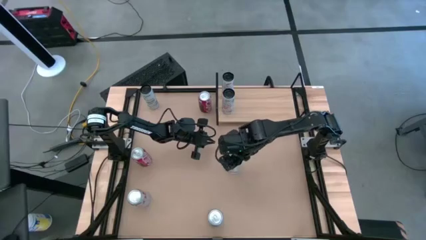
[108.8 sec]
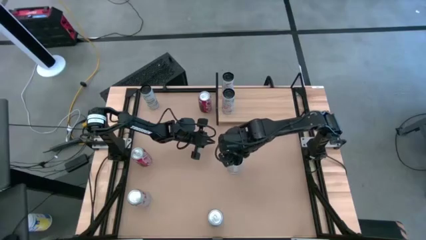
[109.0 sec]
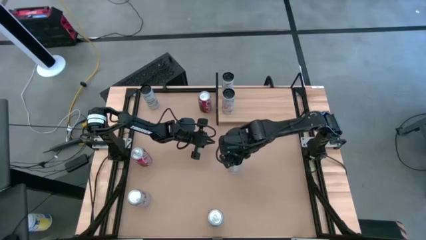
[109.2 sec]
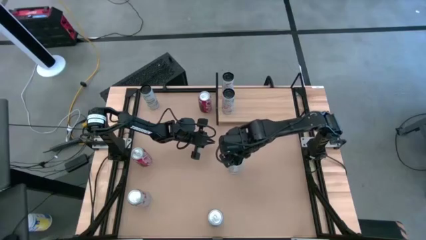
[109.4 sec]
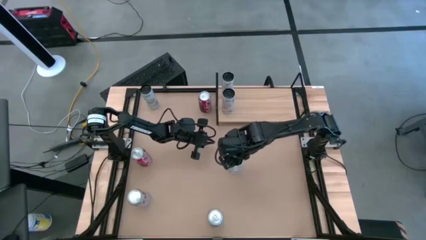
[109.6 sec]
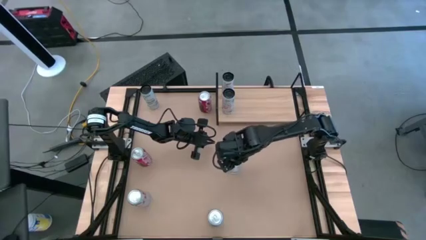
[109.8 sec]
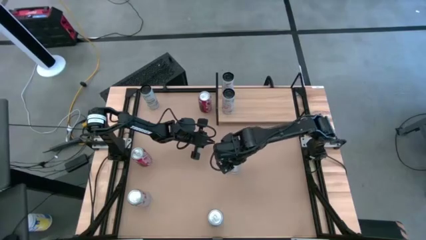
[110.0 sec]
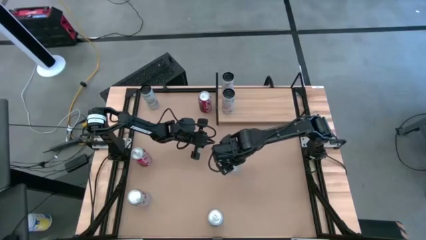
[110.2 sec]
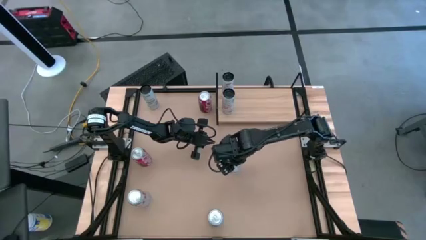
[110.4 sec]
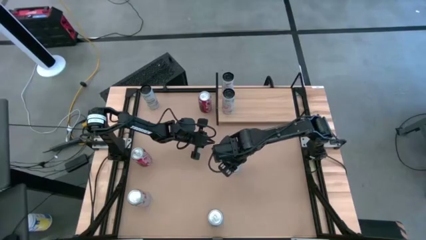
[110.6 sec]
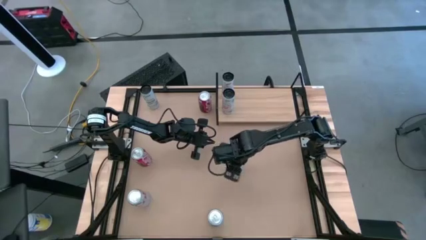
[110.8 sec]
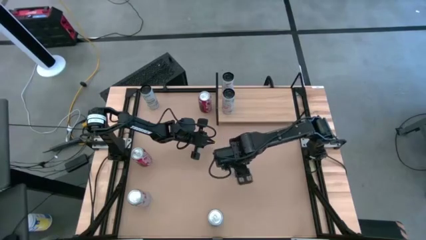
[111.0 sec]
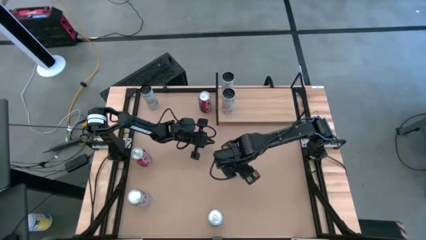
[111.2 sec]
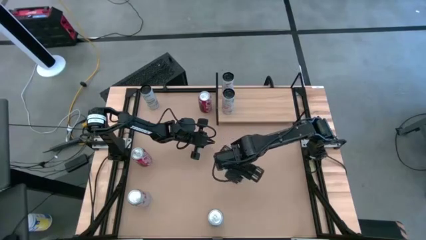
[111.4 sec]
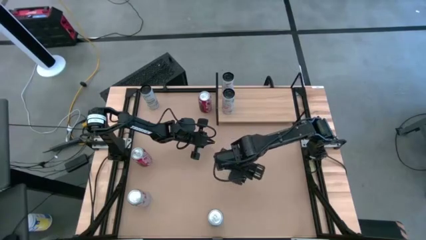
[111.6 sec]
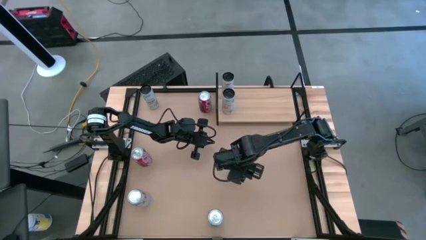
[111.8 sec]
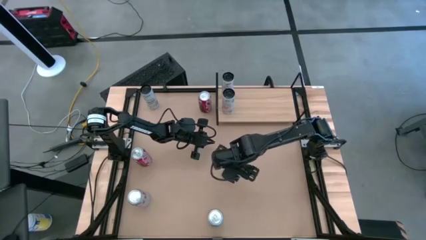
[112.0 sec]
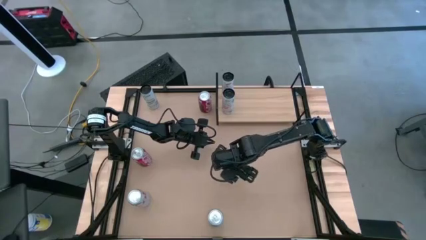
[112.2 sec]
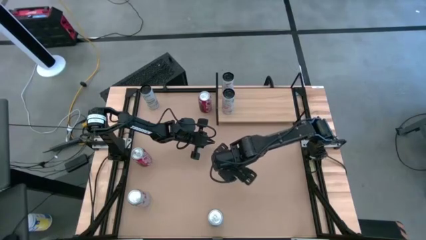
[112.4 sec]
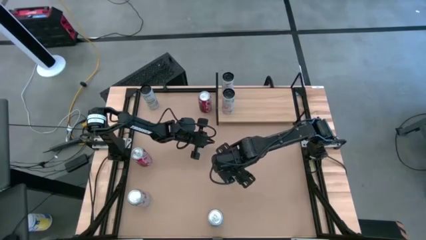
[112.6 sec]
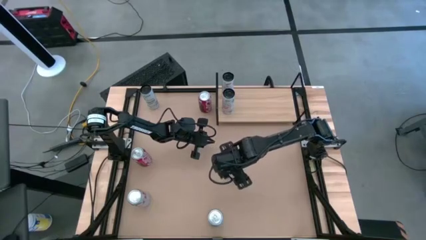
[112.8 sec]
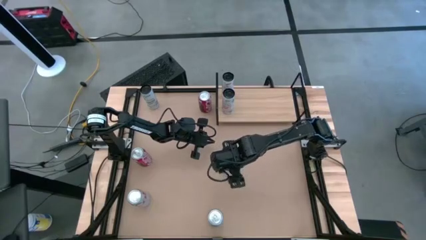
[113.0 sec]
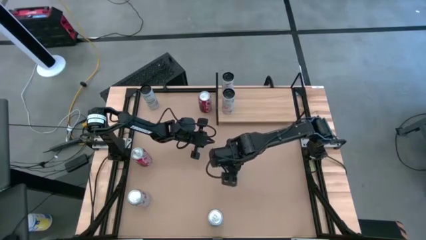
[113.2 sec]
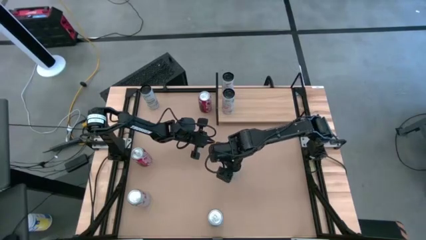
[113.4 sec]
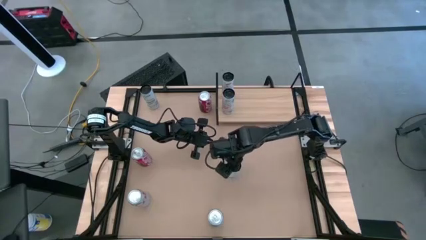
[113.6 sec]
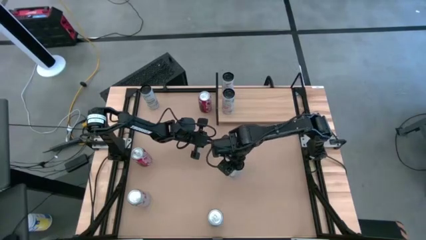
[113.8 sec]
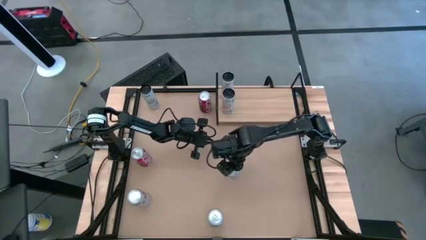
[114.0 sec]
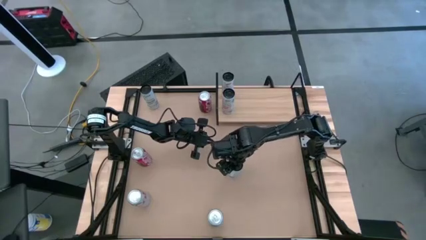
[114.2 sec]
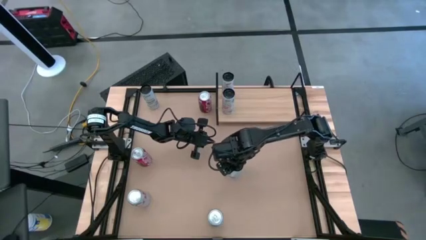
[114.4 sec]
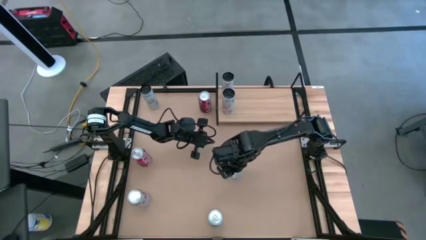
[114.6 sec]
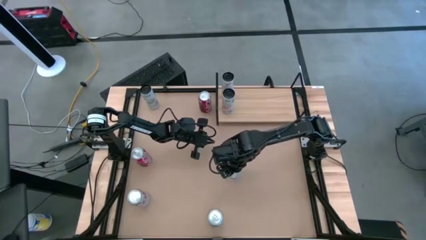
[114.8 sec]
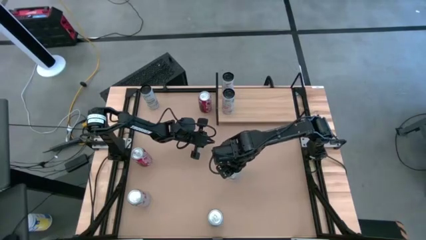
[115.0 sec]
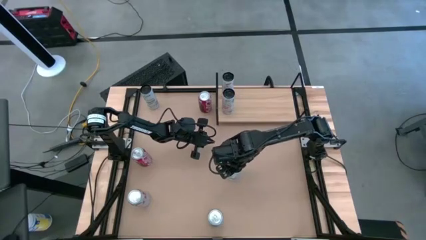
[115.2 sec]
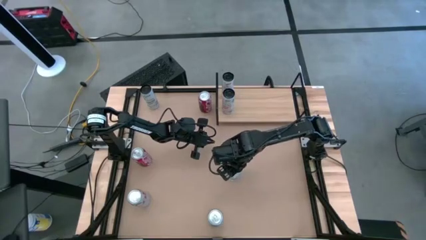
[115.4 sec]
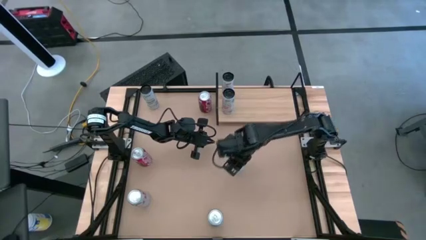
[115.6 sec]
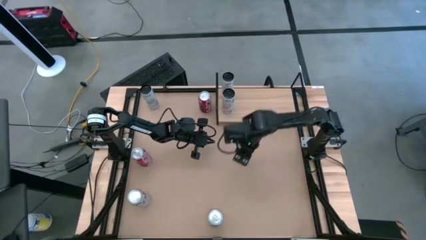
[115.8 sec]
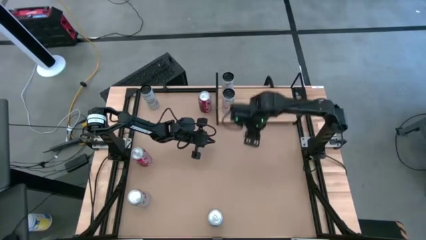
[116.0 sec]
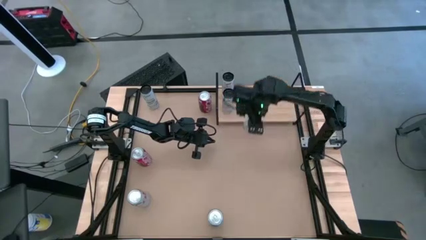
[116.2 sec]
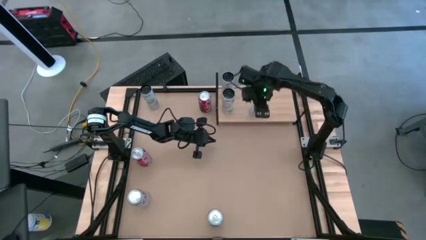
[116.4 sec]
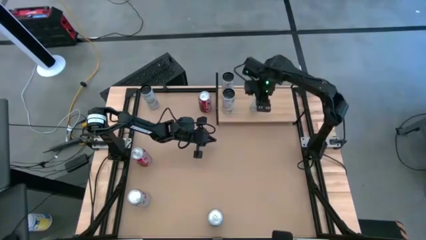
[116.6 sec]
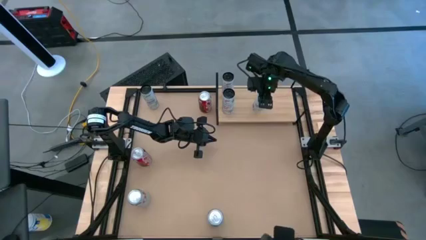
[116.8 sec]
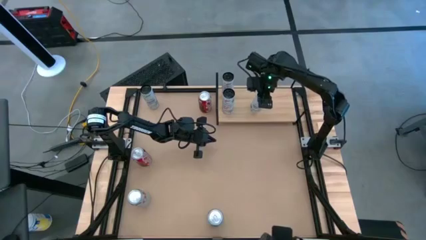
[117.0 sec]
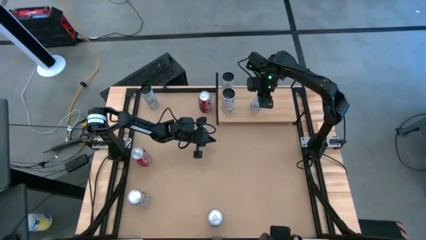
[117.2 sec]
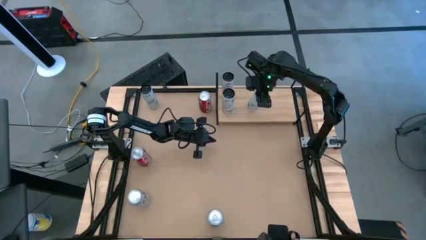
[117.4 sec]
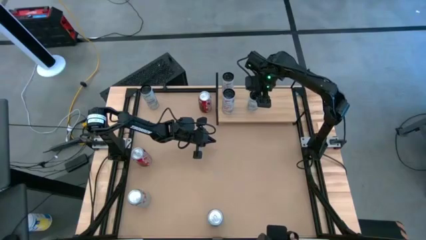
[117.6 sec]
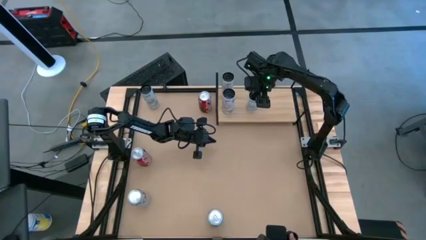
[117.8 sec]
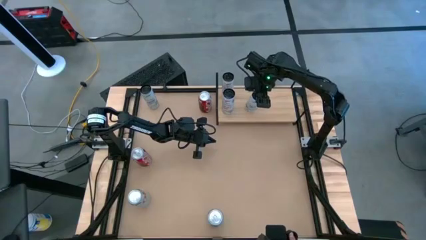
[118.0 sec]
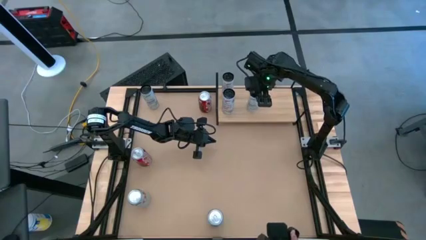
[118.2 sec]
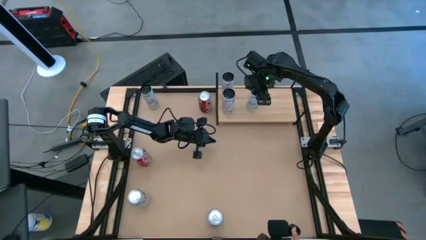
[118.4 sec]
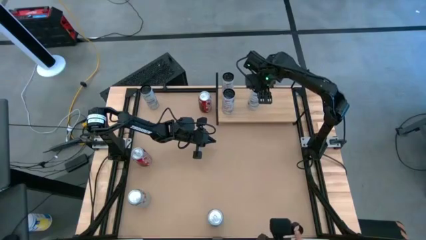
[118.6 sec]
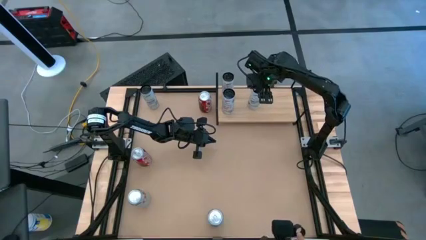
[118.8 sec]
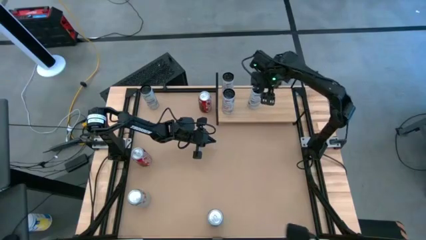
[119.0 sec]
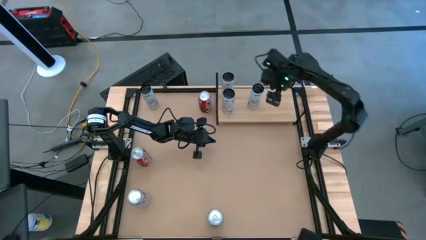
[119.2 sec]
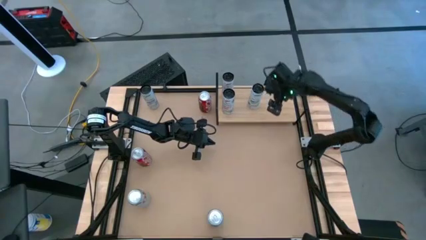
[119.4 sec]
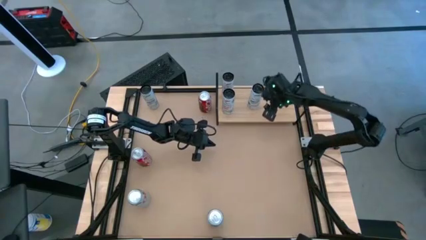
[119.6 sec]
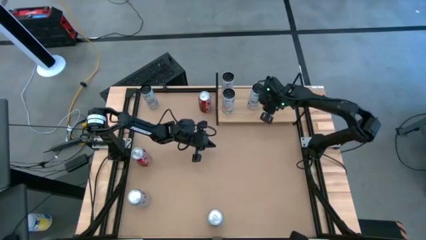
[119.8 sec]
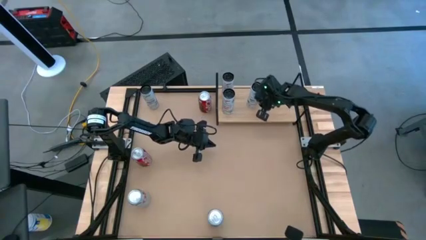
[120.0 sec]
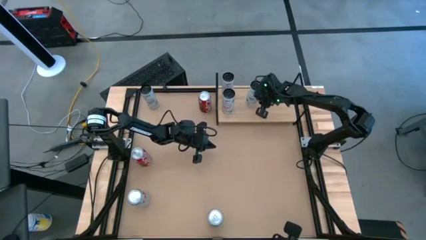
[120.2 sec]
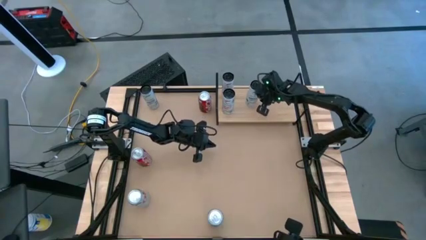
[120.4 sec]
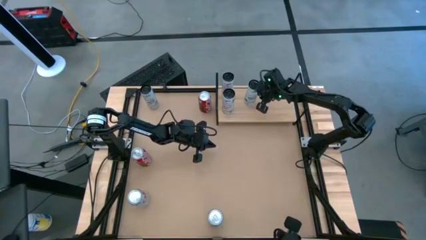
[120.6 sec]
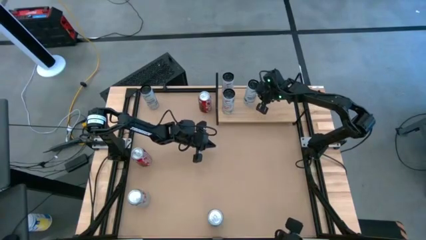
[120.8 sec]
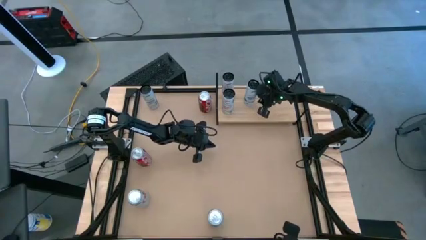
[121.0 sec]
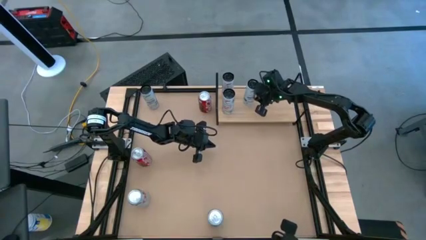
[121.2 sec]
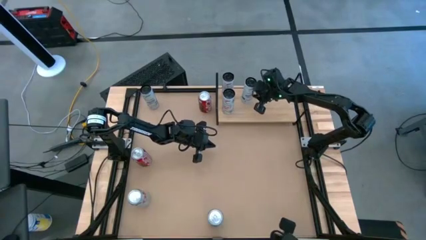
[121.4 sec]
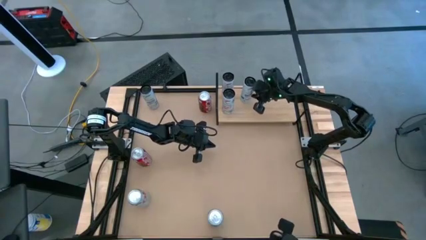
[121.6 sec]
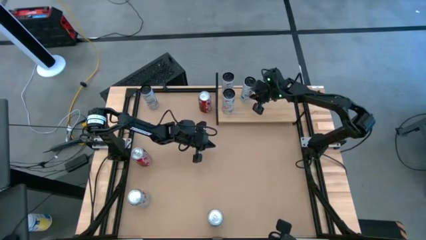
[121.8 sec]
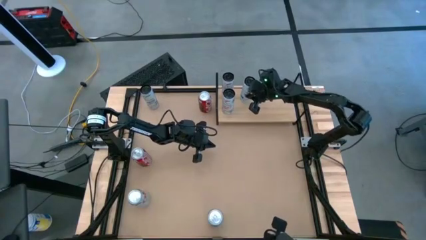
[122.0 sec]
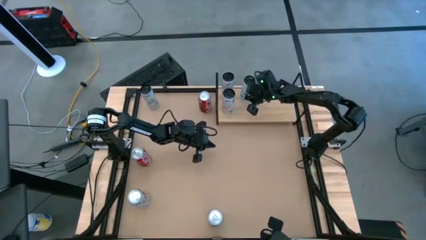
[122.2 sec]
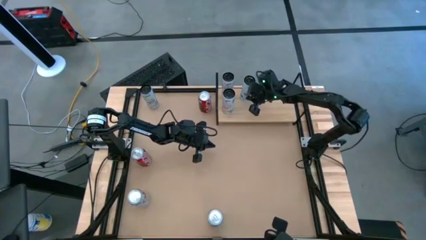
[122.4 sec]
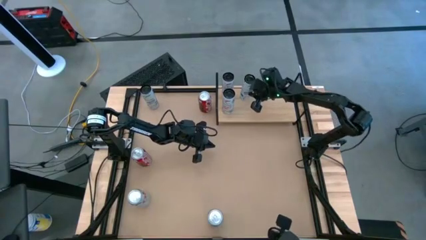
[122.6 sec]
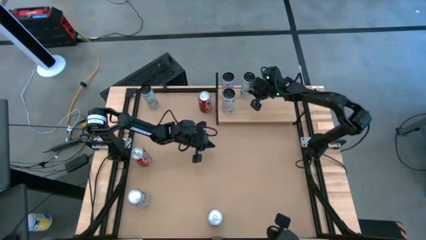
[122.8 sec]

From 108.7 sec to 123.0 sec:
Task: Place canned beverage on shelf
Put the bottom white-blue soda can on the shelf

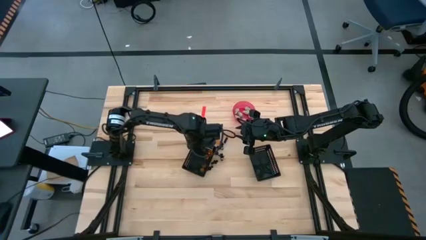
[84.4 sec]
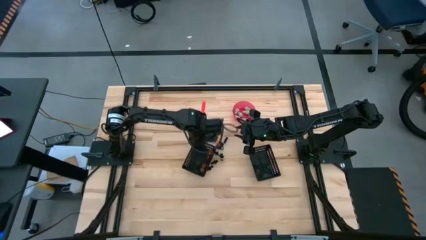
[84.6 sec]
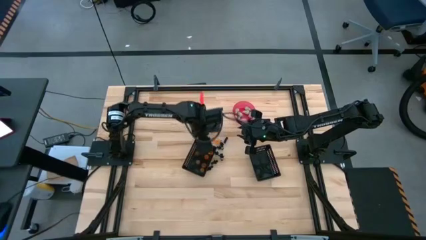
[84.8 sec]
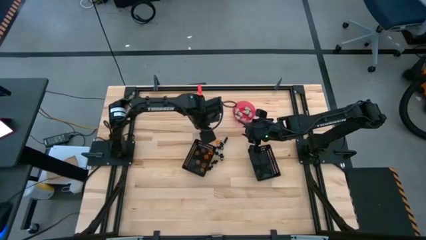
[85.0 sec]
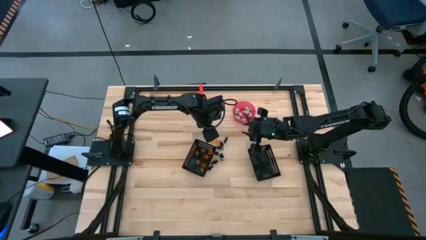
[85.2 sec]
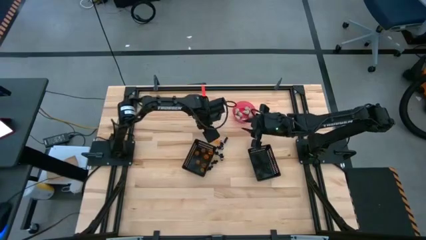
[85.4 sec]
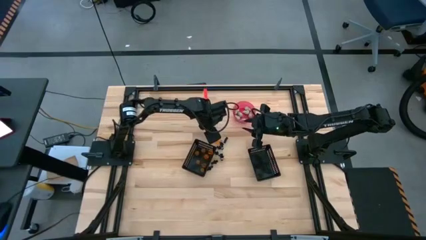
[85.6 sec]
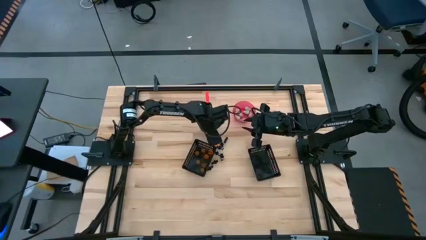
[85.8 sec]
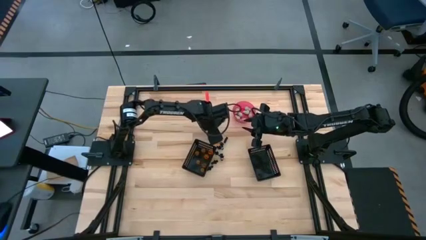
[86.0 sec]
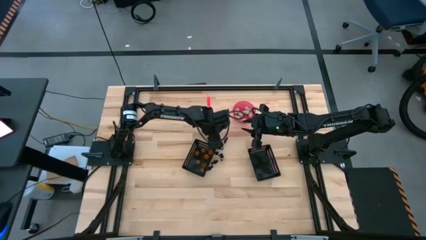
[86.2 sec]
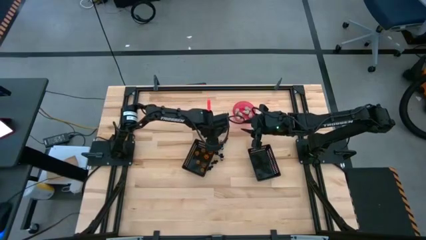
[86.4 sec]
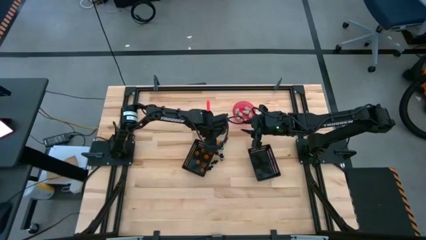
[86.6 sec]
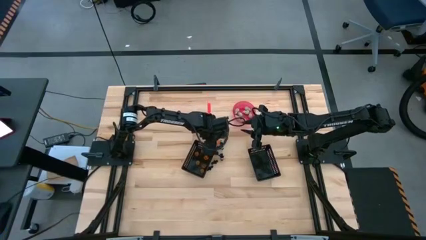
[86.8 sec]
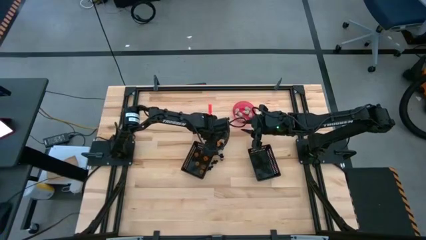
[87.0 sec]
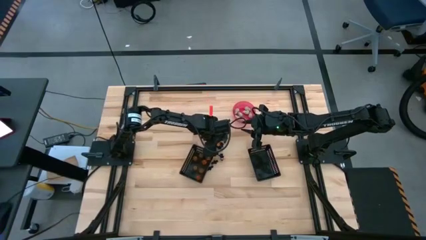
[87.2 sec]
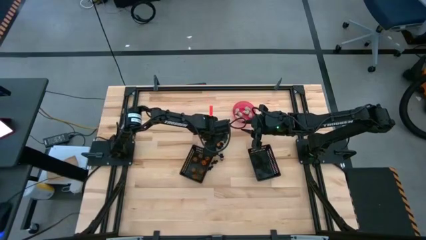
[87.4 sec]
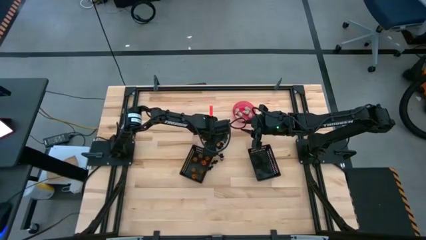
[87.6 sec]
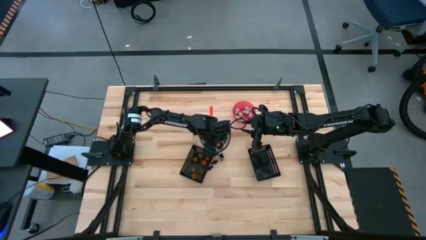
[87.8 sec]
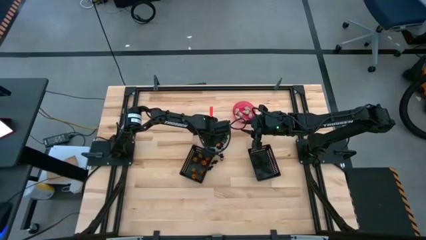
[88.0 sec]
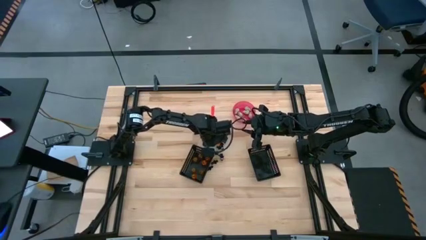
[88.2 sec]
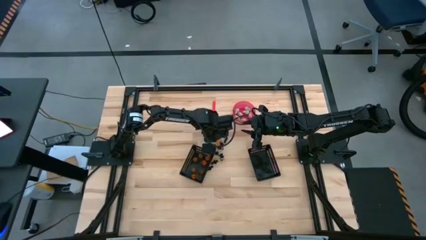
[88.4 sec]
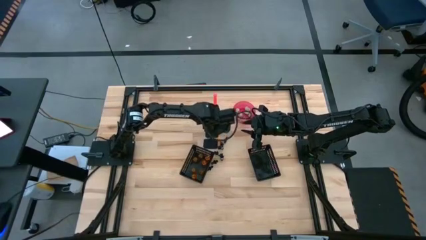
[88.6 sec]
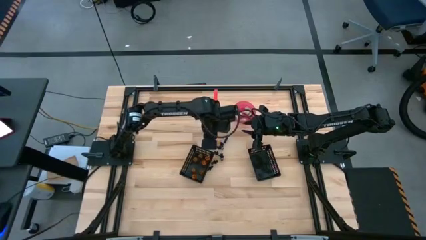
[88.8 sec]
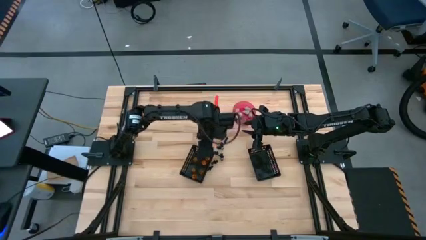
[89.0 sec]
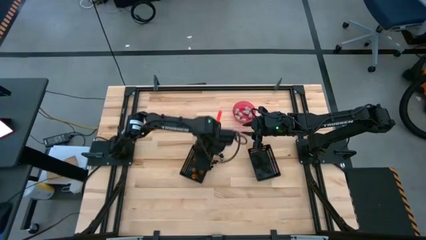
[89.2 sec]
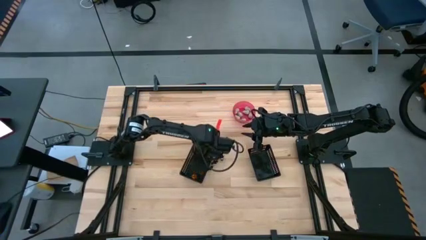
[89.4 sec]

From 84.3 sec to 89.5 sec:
Task: Sort Halloween decoration
Put the orange pumpkin toy into the left black bin
